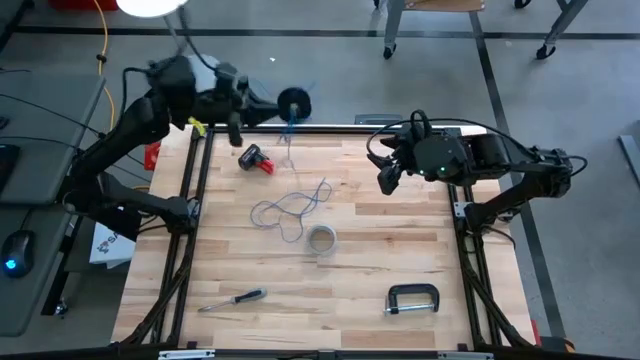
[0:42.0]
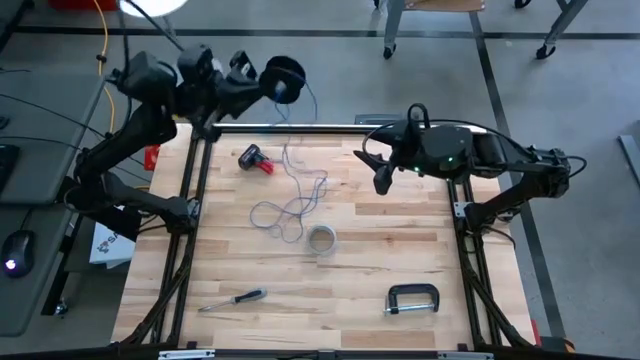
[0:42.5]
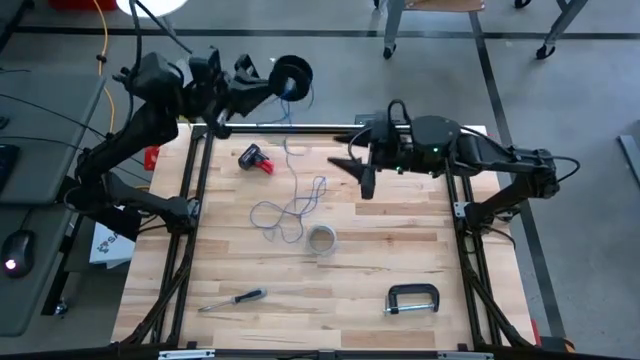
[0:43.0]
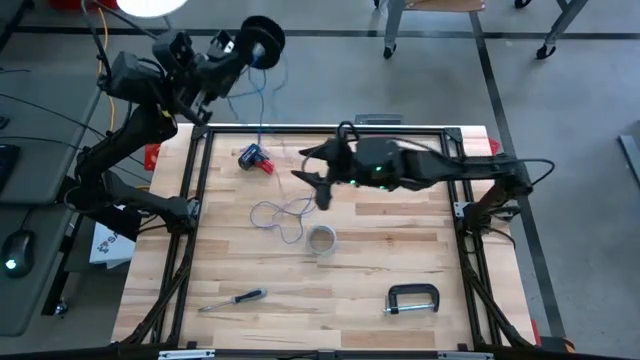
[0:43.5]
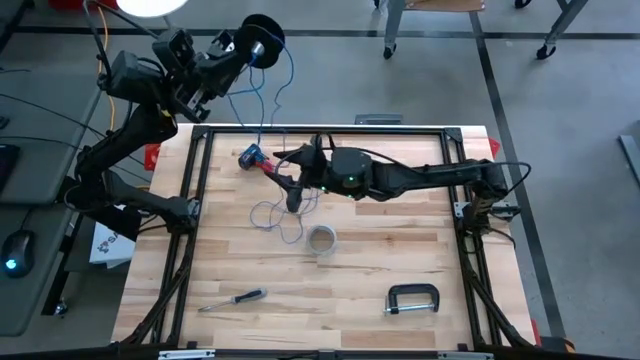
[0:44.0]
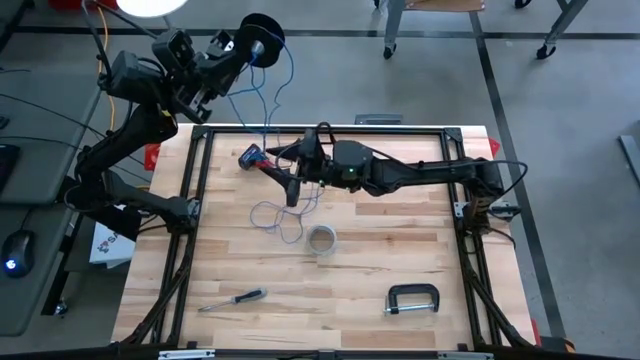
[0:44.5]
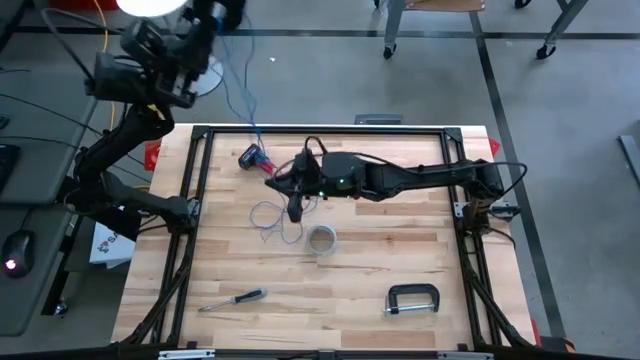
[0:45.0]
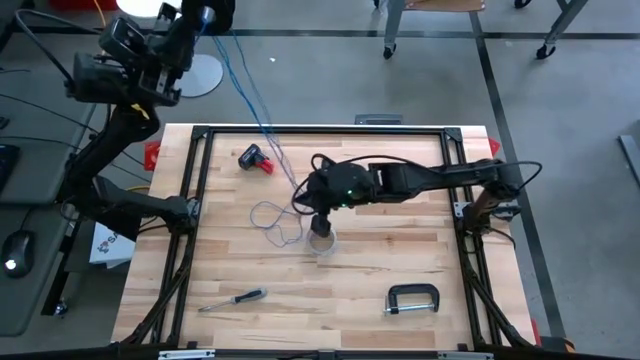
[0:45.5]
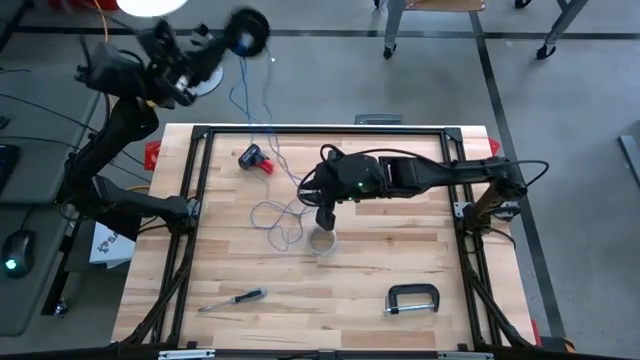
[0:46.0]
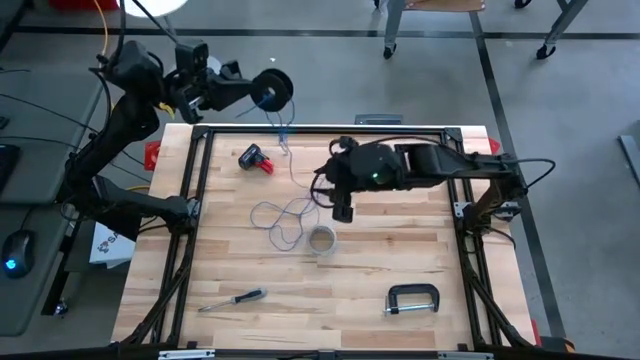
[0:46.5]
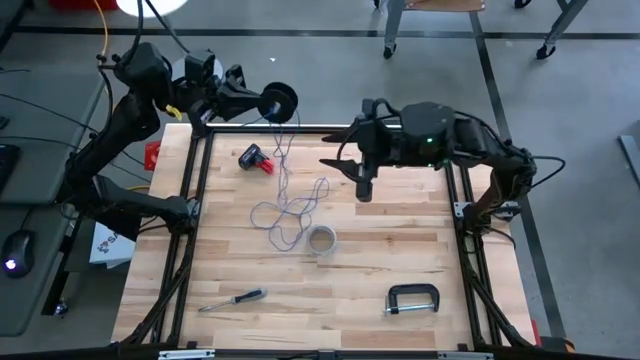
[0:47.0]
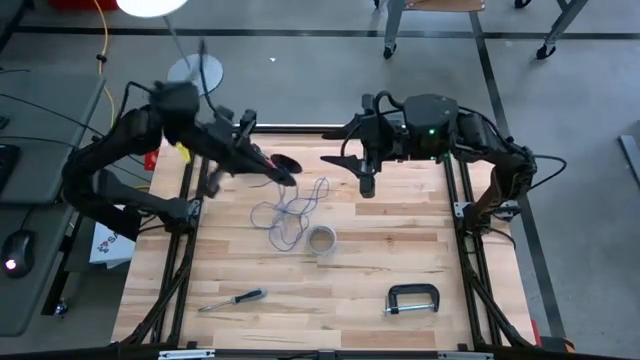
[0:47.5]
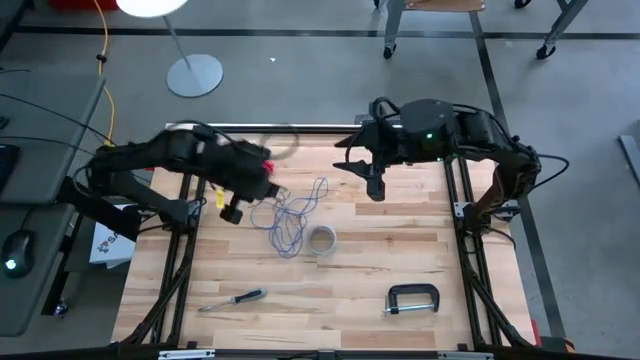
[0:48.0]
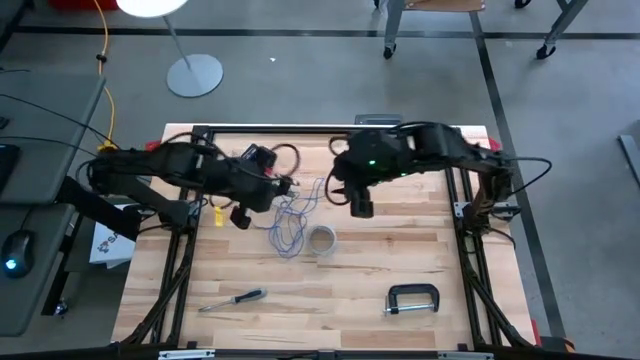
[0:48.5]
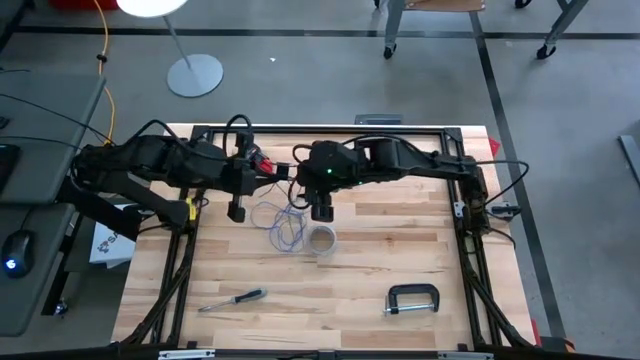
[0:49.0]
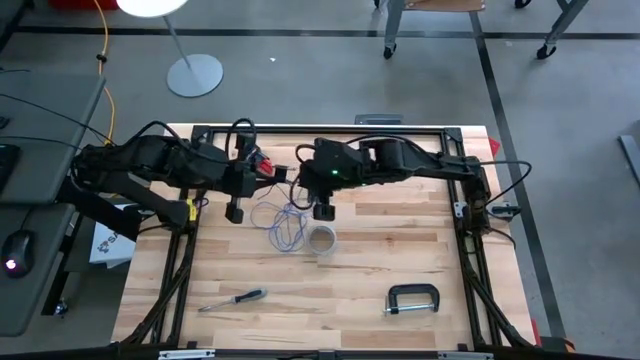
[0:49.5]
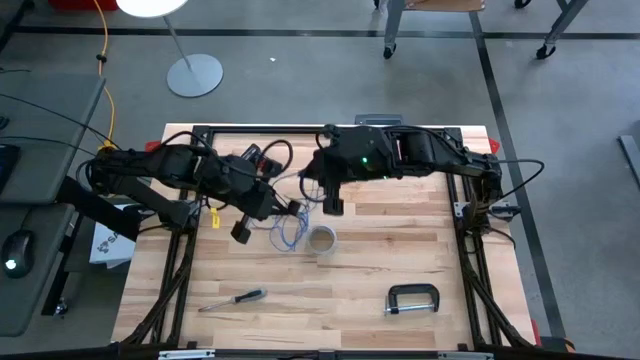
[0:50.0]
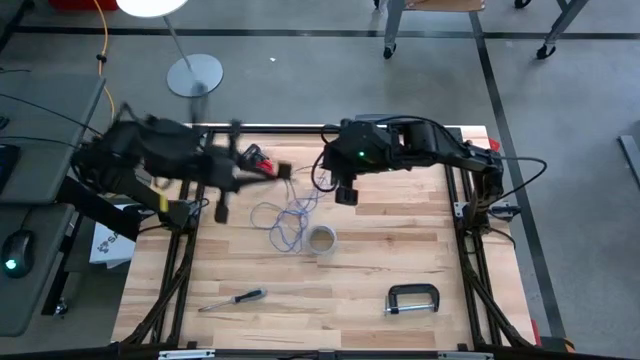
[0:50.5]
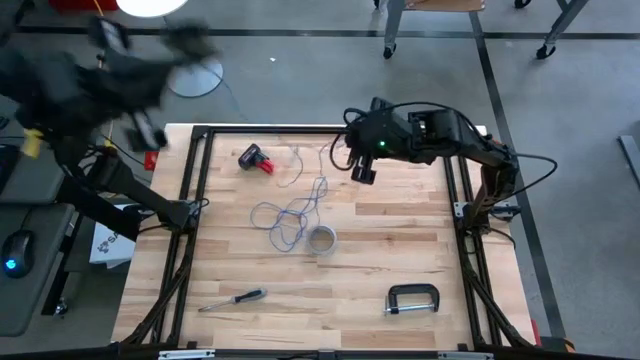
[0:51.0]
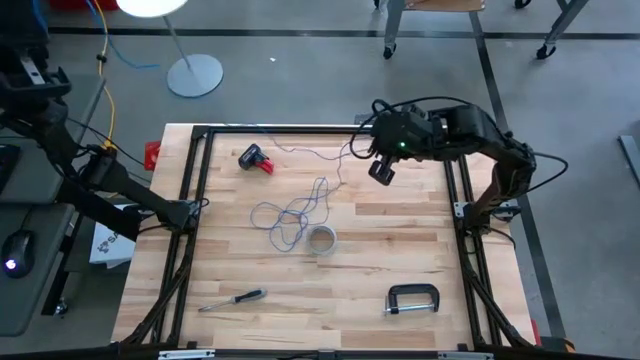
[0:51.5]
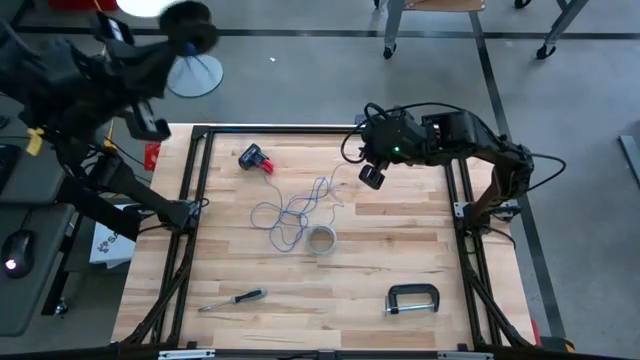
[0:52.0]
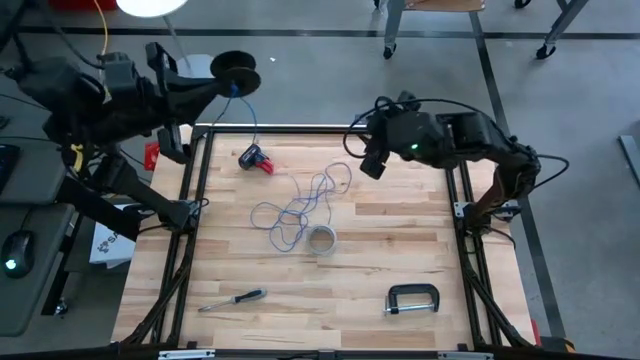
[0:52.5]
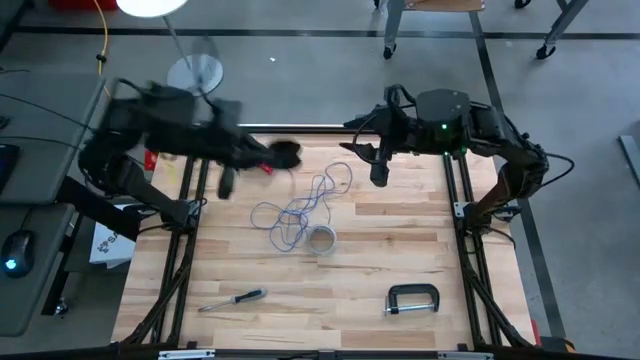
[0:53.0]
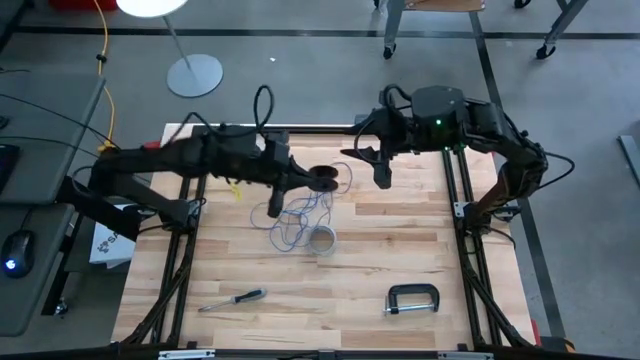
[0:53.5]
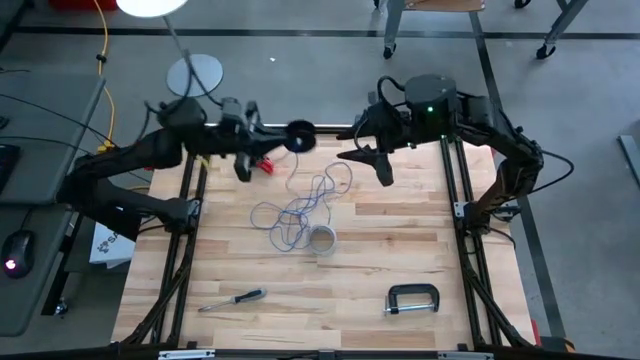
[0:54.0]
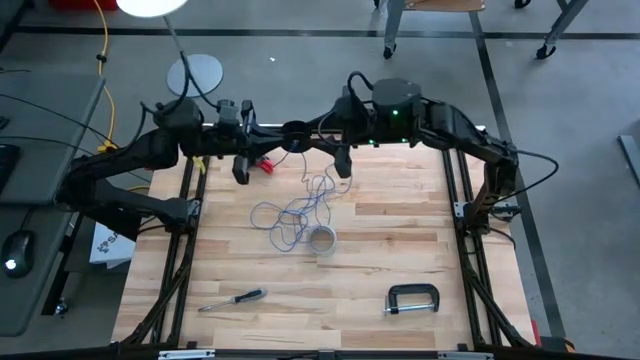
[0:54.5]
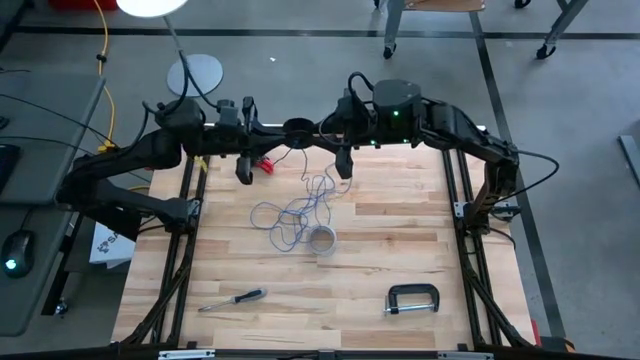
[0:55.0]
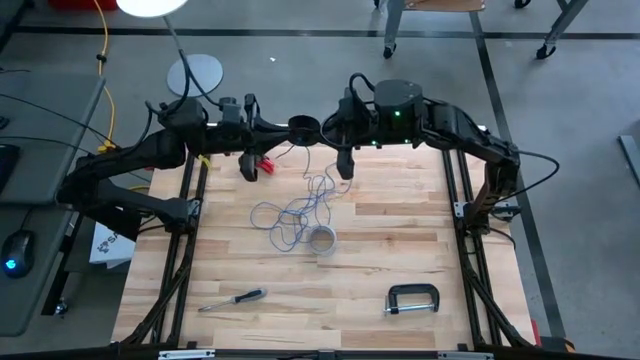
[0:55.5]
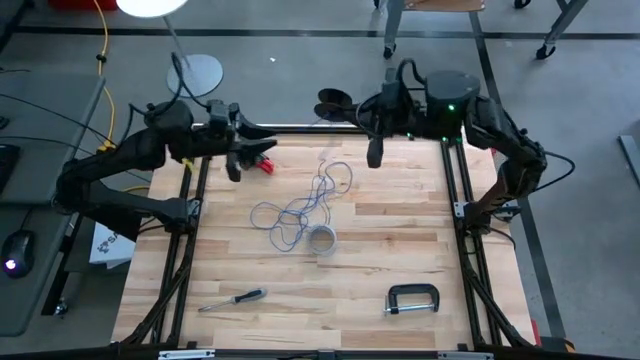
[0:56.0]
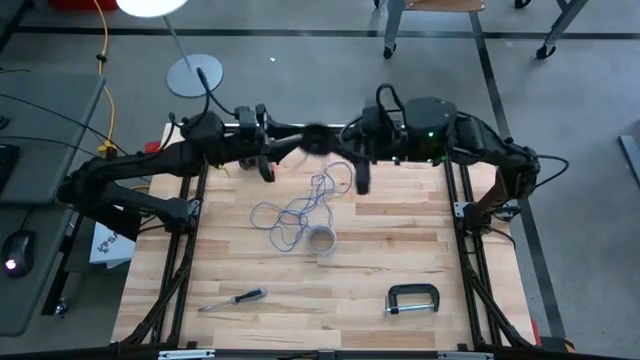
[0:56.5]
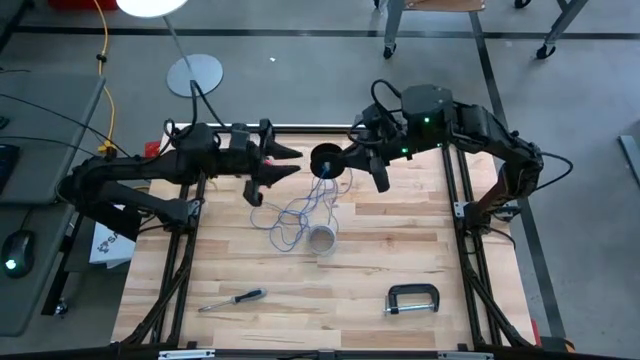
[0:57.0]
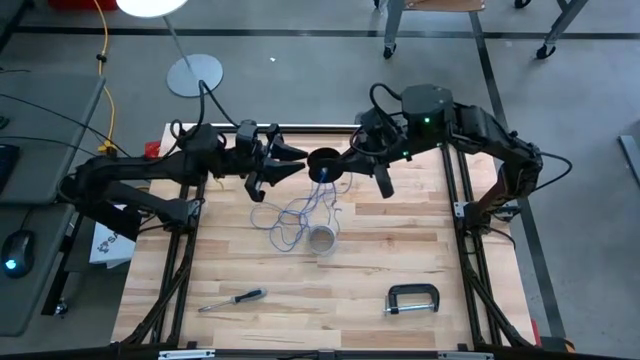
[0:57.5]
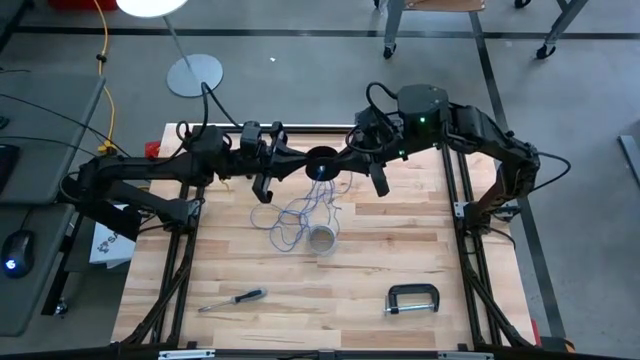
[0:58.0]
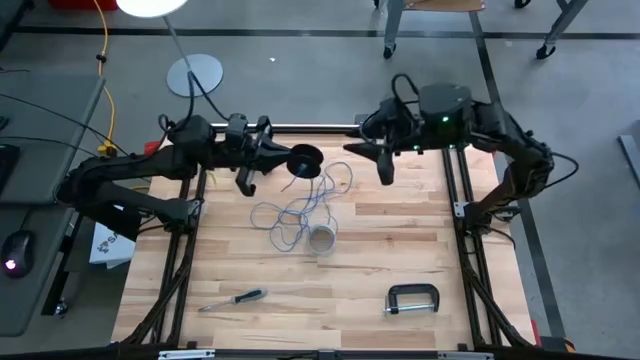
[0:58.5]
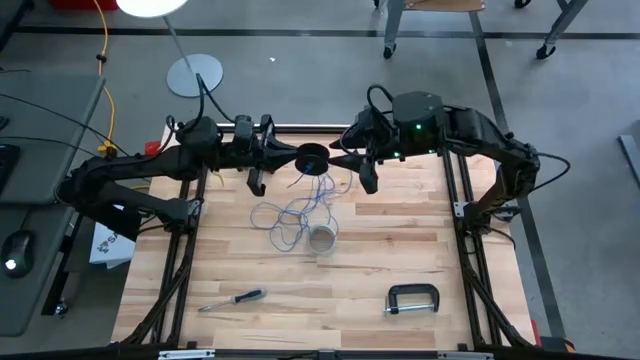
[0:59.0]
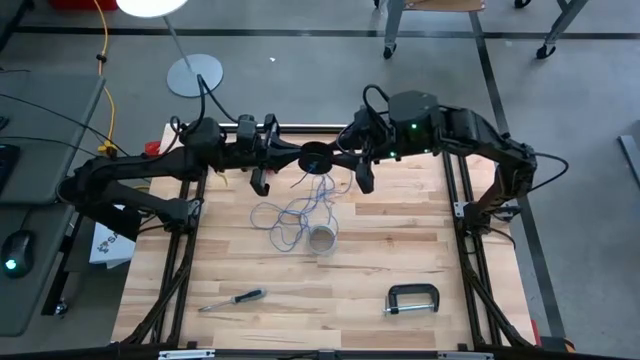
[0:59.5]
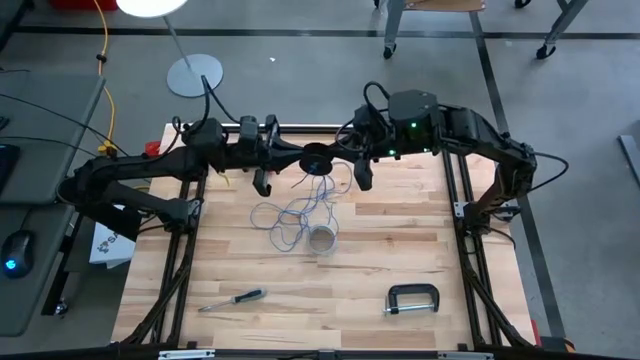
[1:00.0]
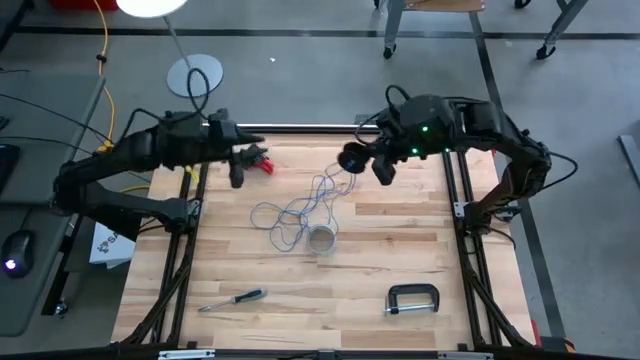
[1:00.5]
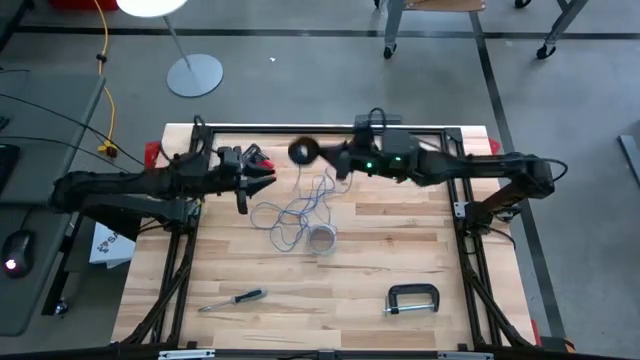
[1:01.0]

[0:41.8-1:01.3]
Task: Coil cords
Uncoil the blue wire from the spool
